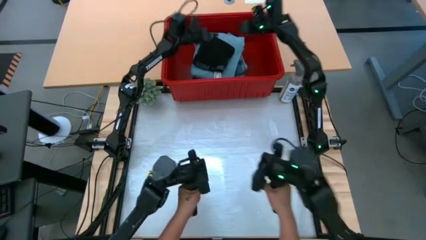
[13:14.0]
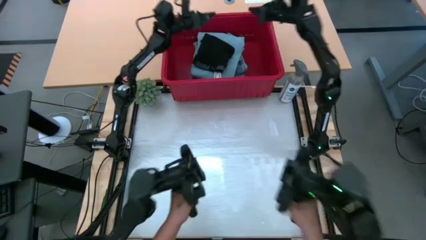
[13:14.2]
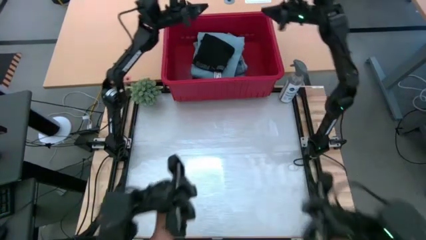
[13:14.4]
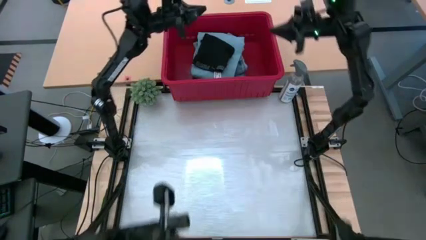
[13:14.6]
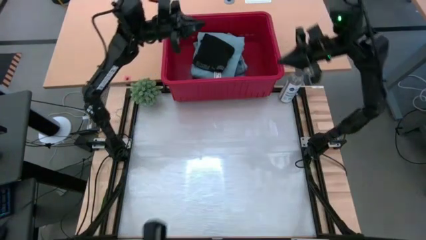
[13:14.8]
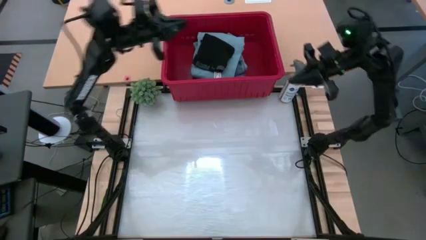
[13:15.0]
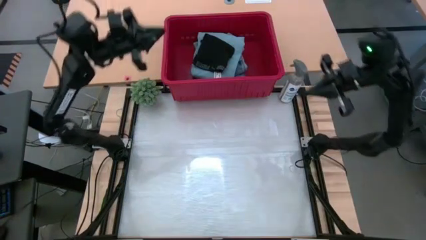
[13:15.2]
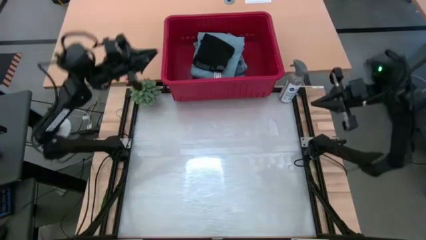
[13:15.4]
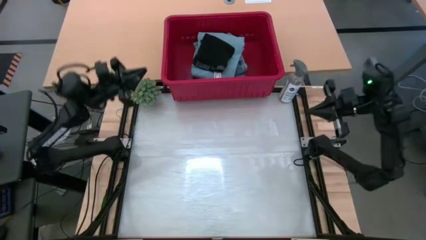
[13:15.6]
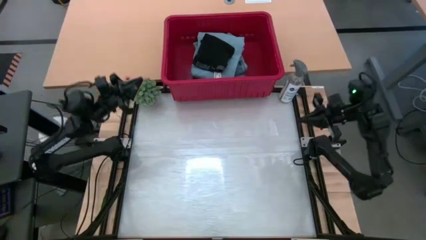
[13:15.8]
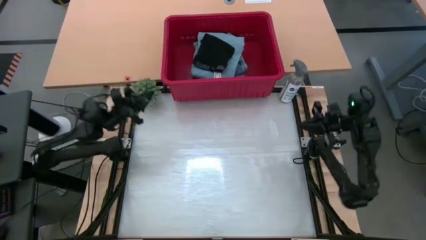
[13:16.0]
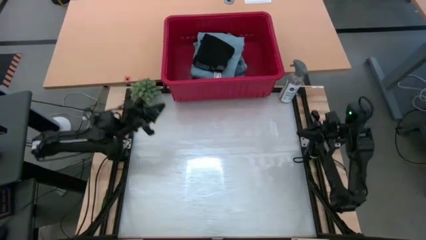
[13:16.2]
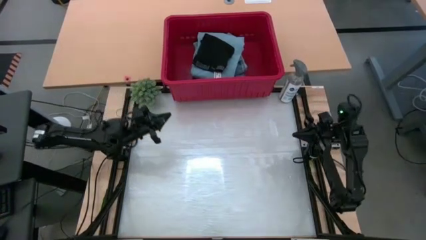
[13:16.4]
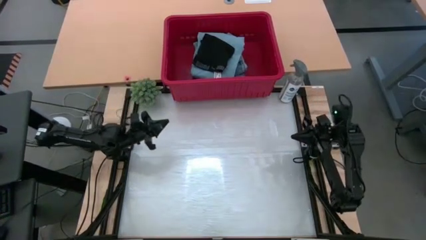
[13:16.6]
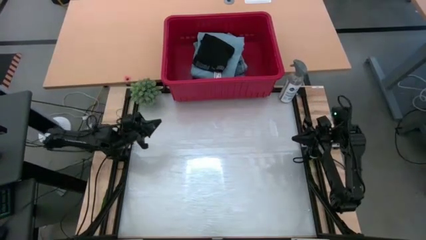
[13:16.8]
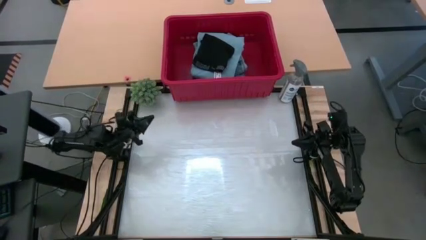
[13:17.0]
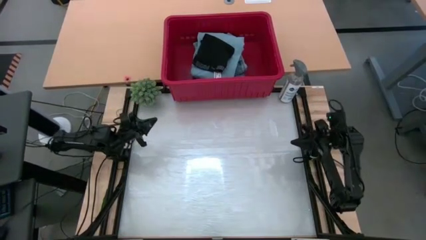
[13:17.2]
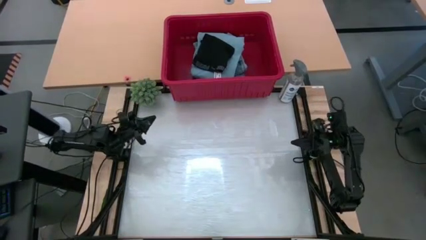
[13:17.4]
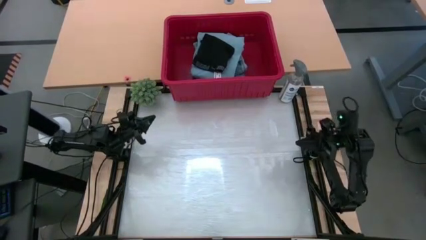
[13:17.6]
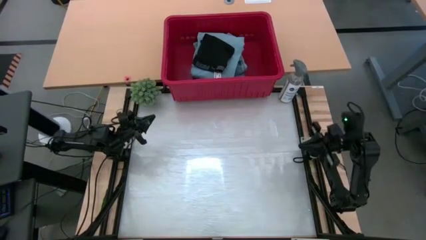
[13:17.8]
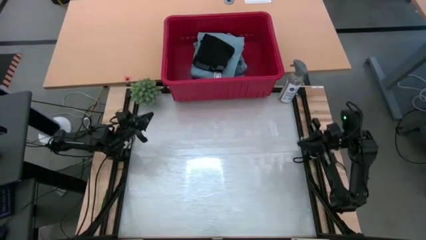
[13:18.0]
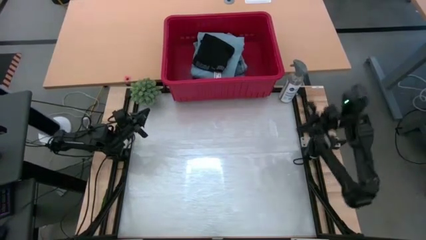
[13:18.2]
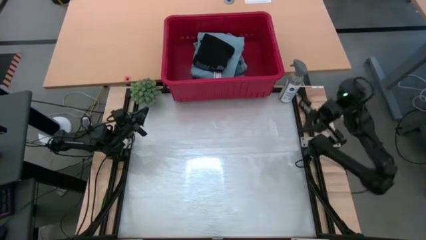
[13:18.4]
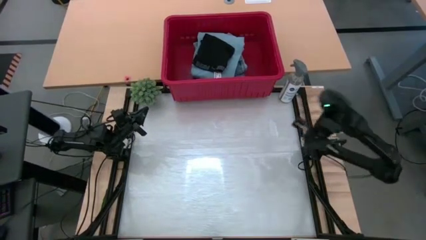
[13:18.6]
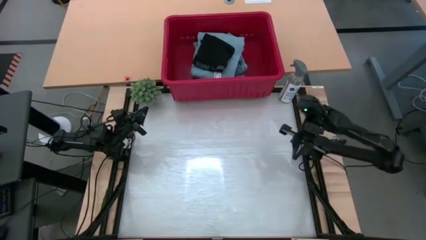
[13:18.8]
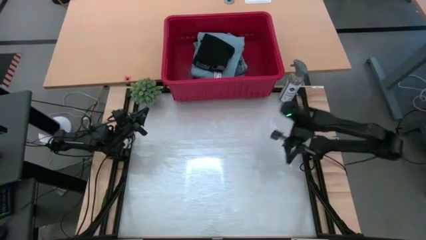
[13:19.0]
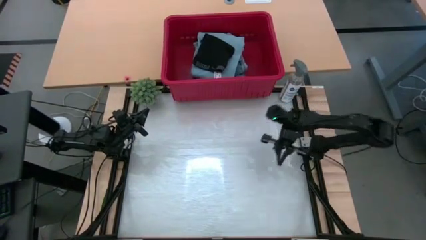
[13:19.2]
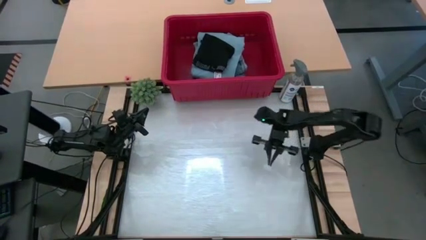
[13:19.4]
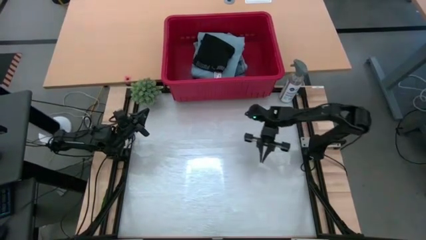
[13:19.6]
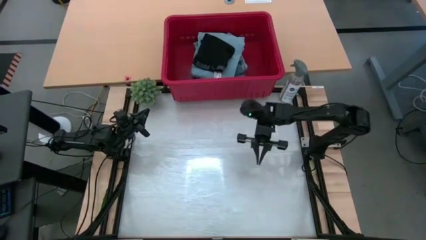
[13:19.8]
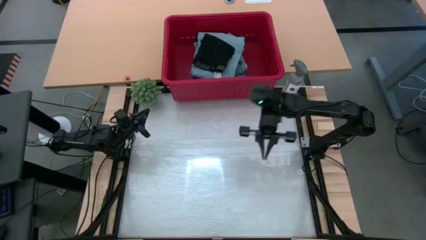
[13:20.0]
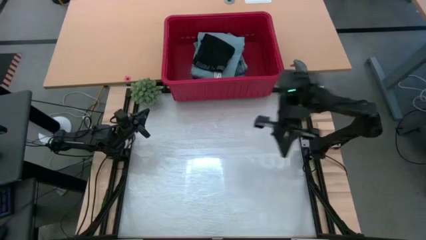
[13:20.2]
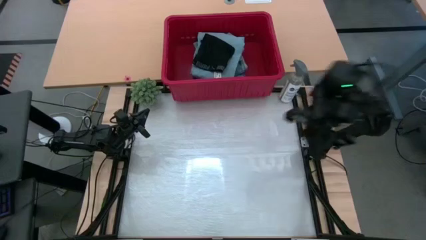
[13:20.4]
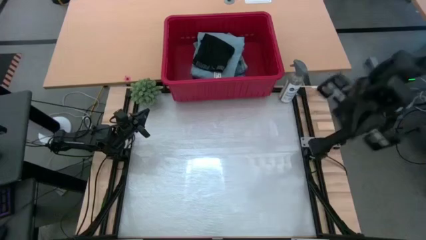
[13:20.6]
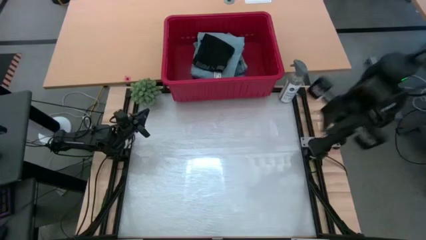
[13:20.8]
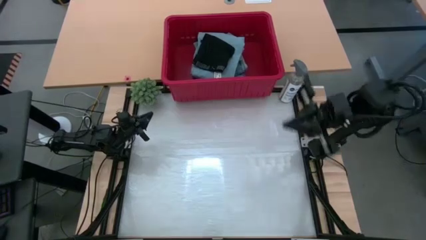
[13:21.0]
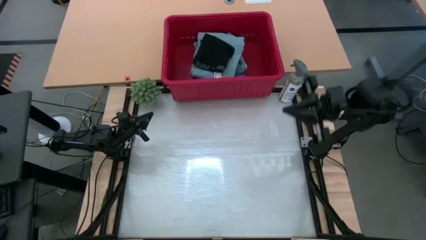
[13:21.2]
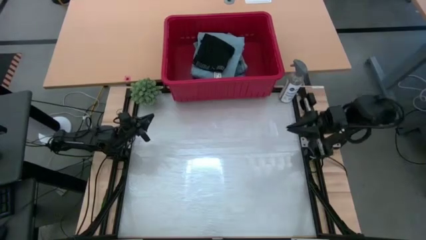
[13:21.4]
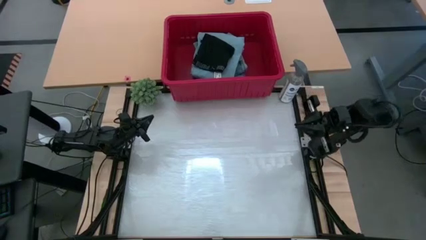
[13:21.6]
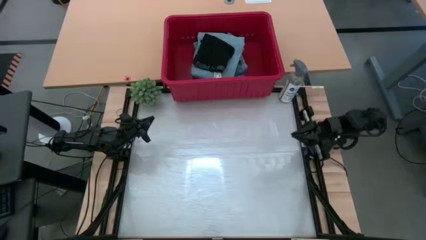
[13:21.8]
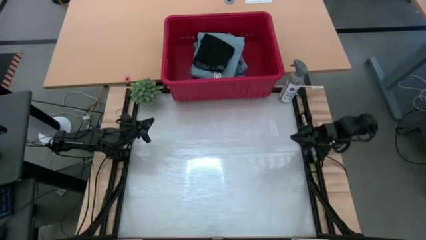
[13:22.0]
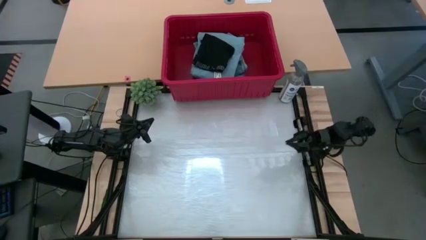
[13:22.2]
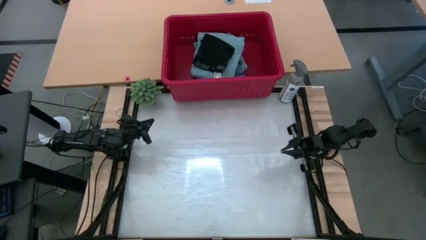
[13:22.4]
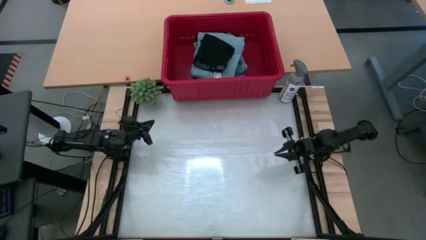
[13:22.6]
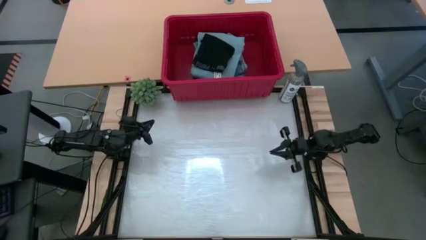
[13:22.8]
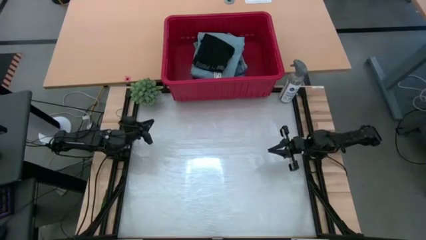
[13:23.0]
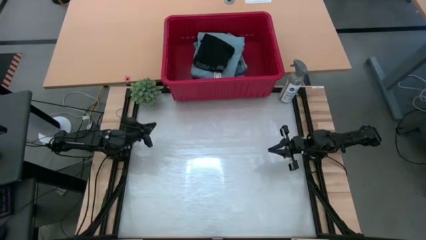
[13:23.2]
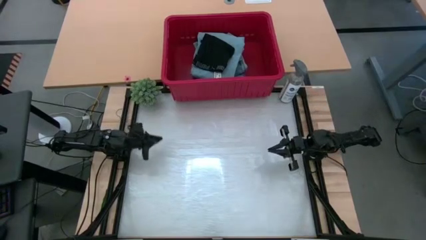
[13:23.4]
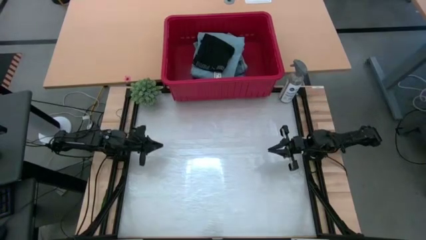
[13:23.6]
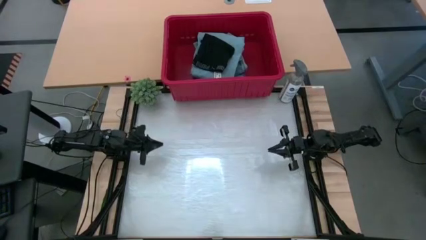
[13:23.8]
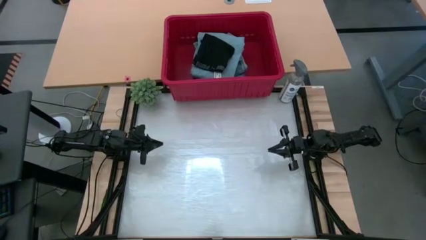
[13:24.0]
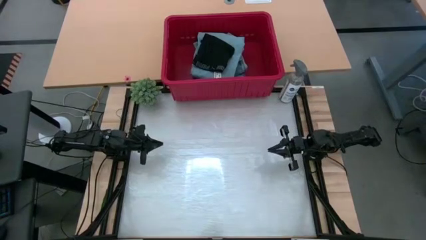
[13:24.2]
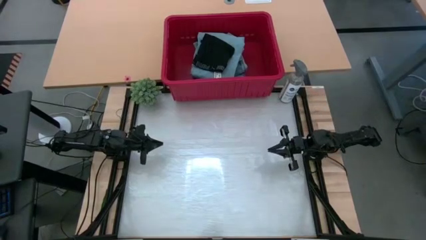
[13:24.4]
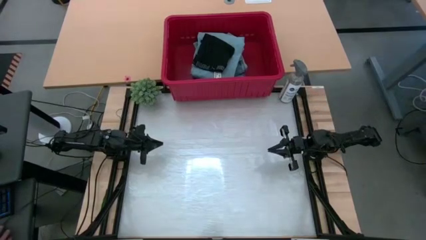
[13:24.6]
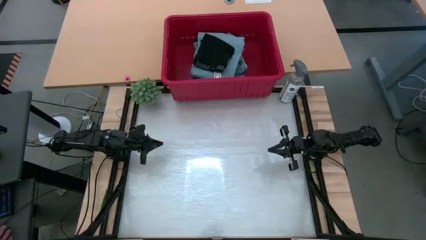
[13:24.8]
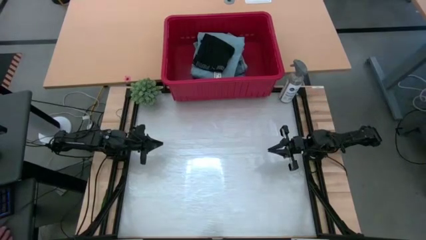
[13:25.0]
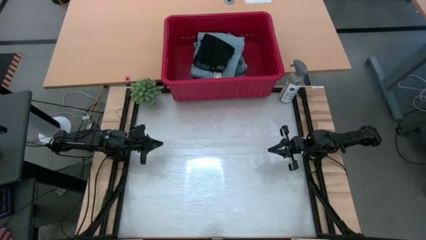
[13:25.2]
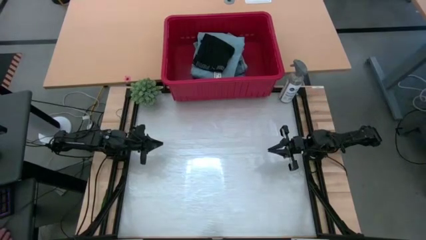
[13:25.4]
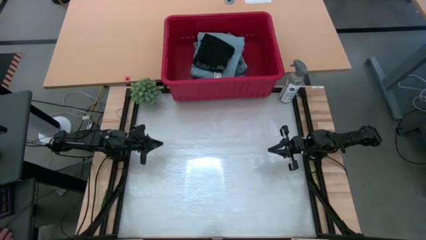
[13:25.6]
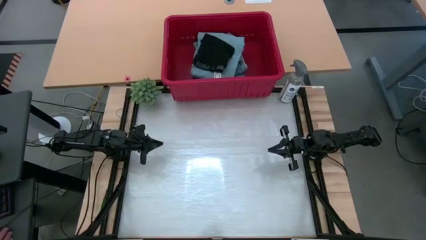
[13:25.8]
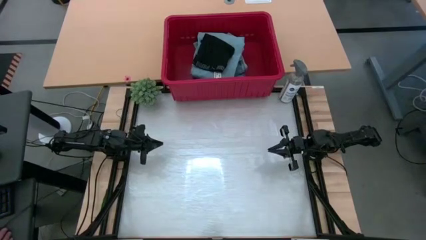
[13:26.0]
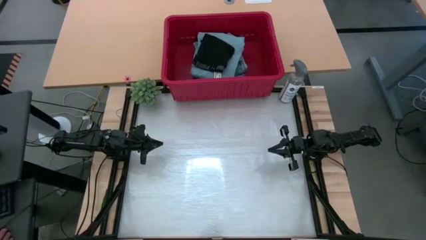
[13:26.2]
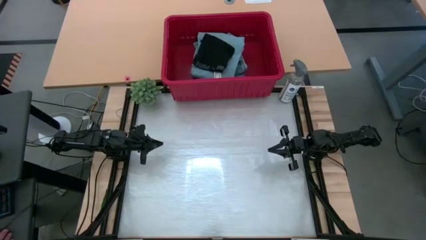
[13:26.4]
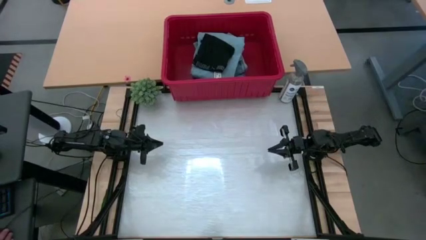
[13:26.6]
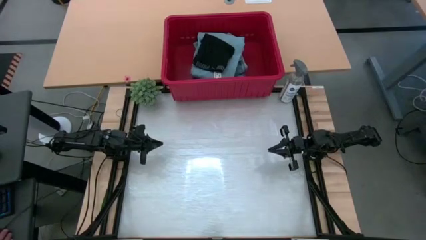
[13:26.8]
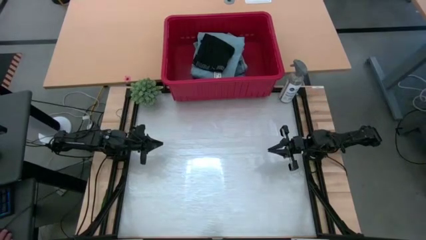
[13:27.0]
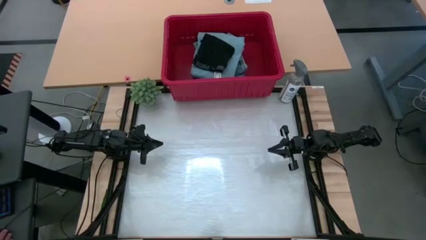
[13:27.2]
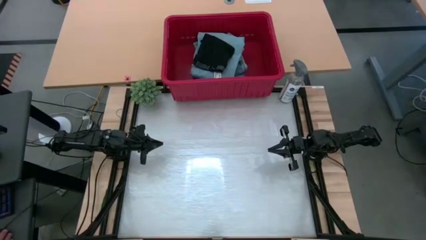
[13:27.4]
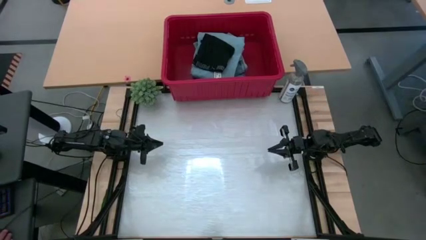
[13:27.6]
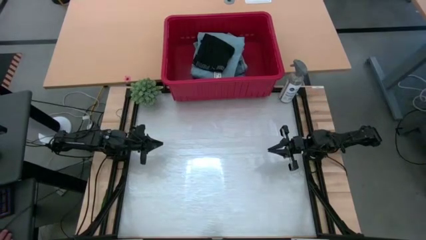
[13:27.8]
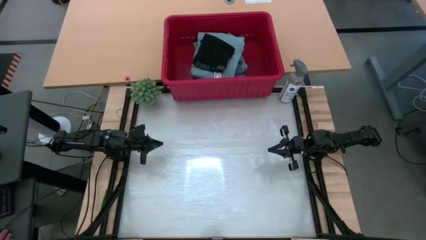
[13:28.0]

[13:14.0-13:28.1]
Task: Fold Laundry from Bin
Return to Home Position
